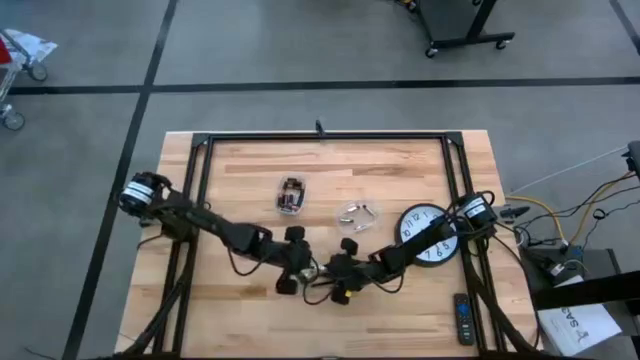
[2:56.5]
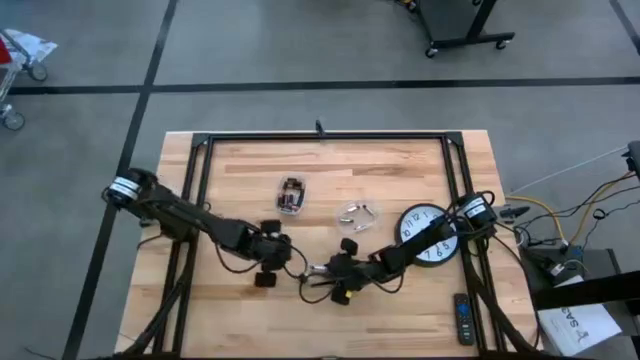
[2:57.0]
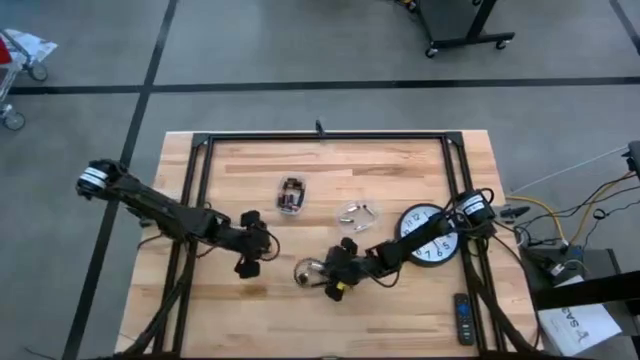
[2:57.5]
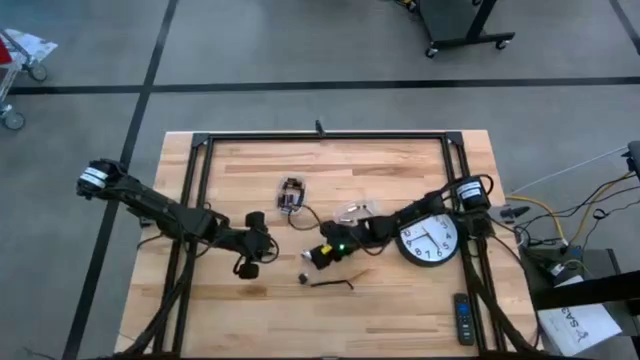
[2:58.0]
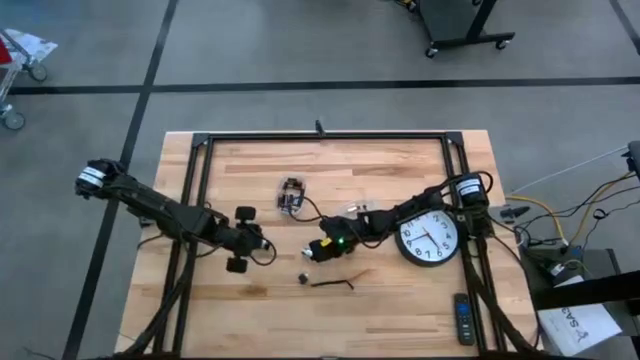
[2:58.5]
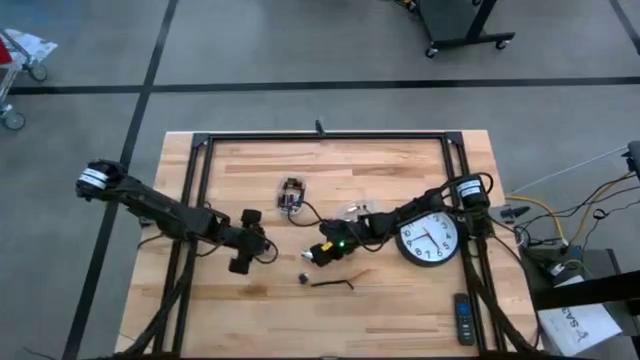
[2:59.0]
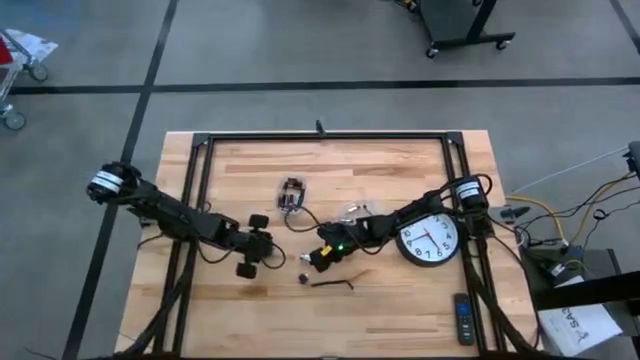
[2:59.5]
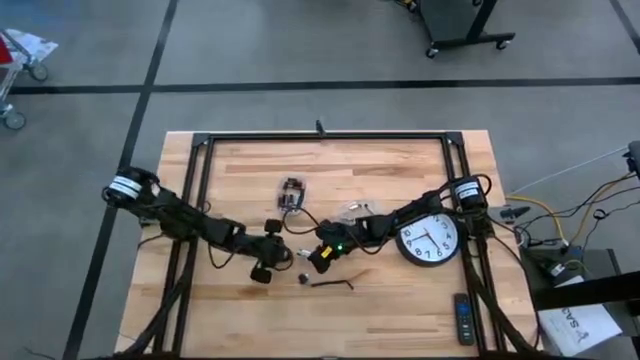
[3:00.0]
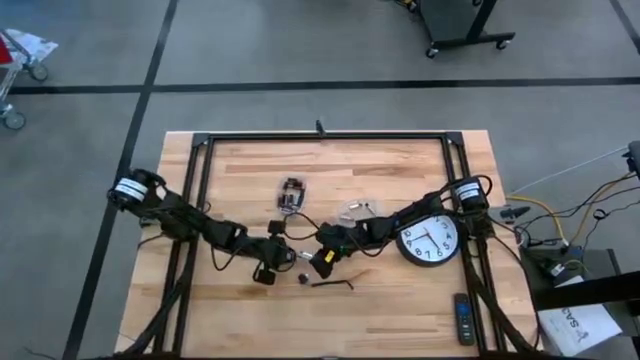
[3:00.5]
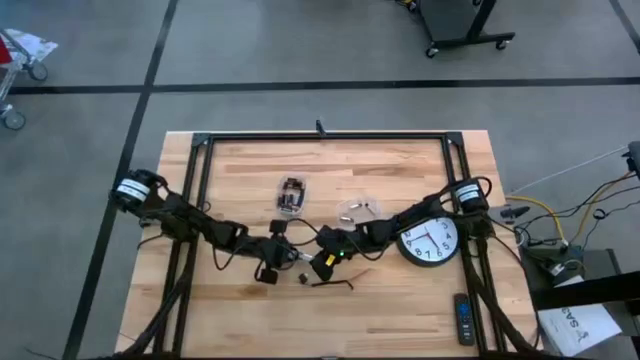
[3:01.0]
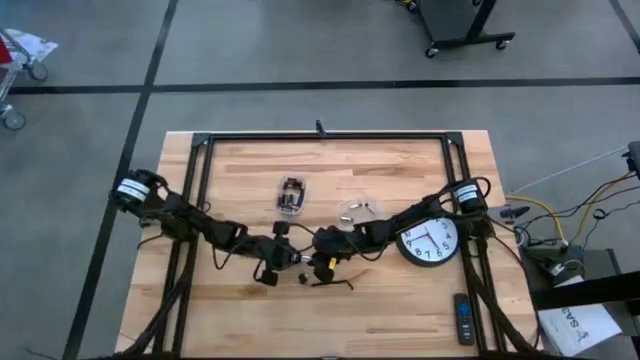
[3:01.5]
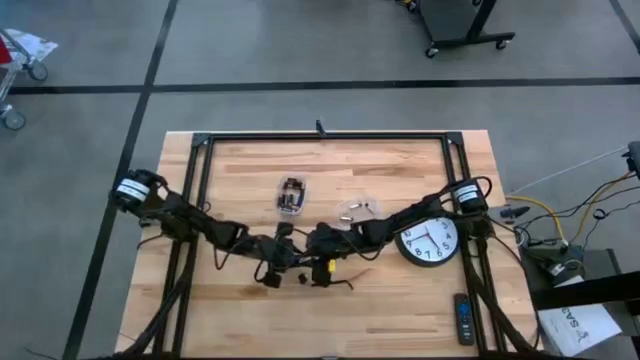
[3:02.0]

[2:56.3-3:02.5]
Task: Insert battery
Put the battery compartment inside the black flashlight

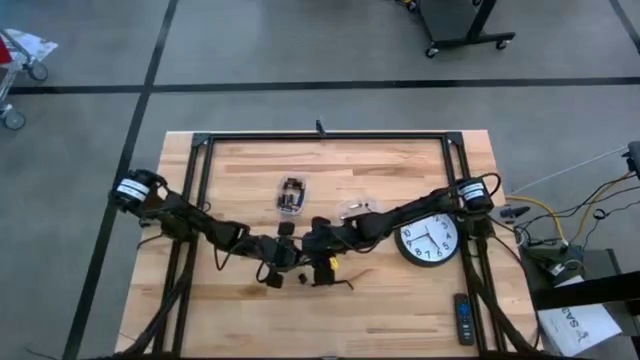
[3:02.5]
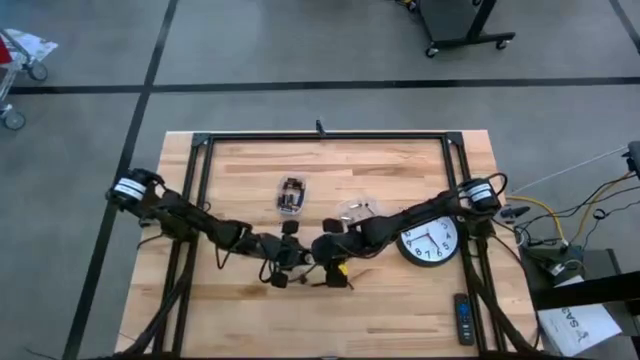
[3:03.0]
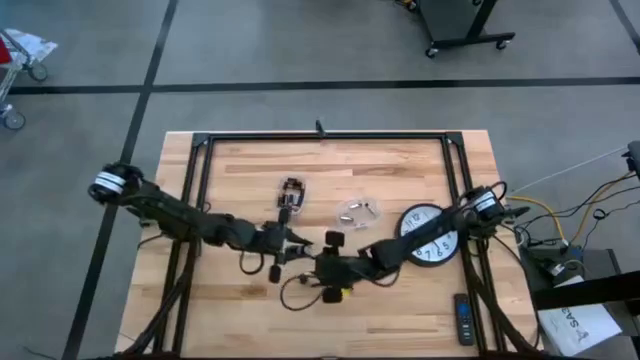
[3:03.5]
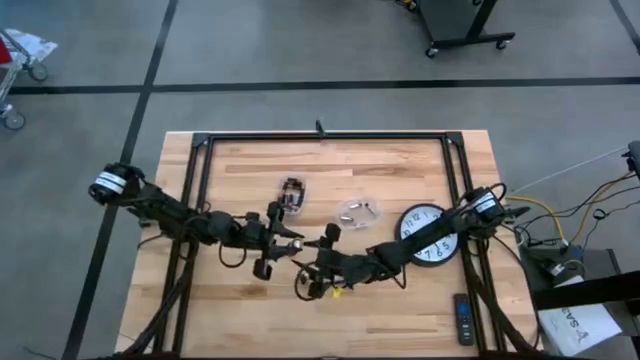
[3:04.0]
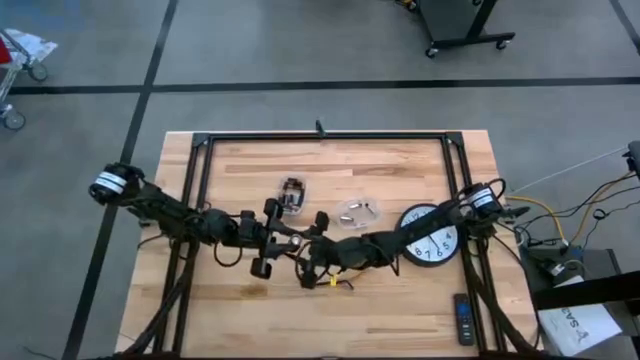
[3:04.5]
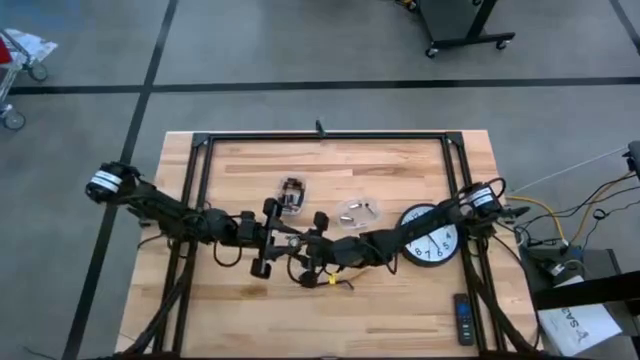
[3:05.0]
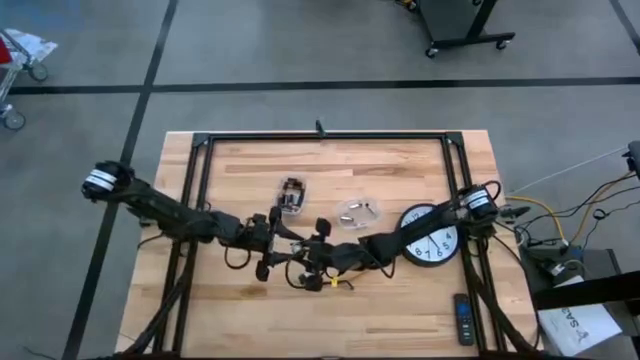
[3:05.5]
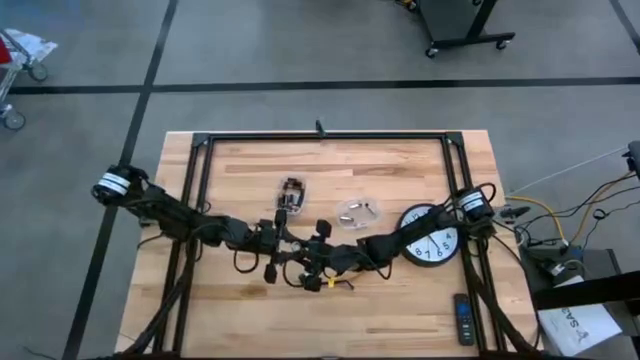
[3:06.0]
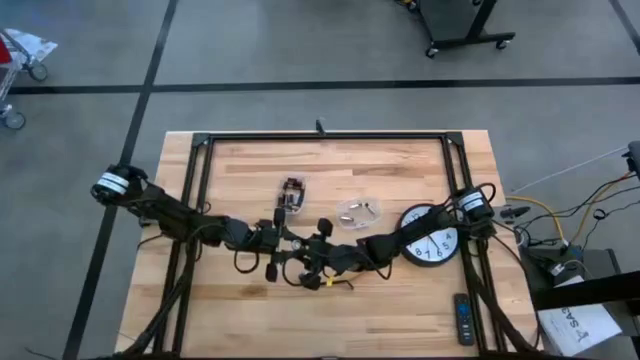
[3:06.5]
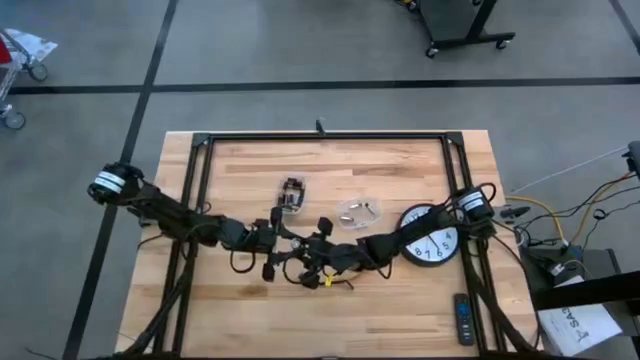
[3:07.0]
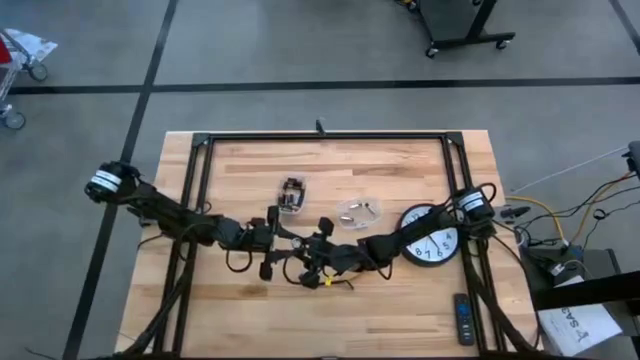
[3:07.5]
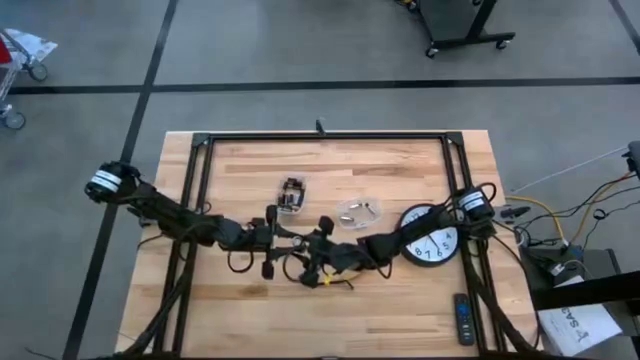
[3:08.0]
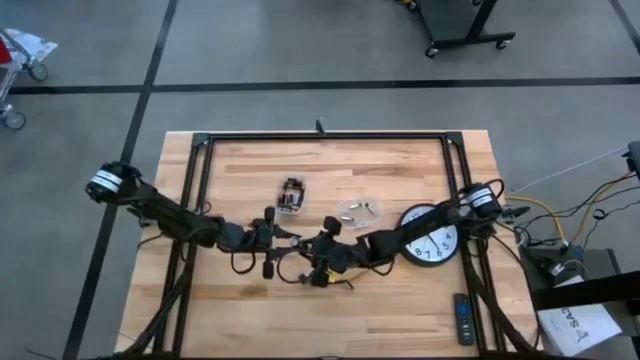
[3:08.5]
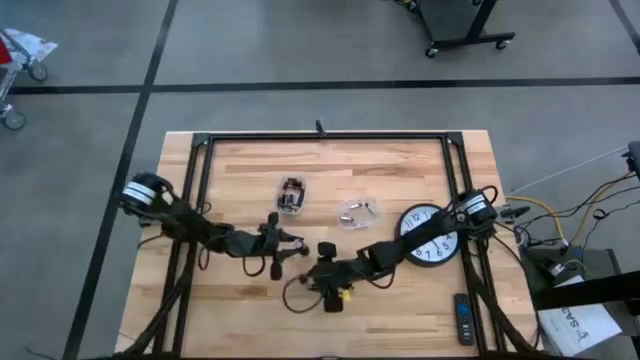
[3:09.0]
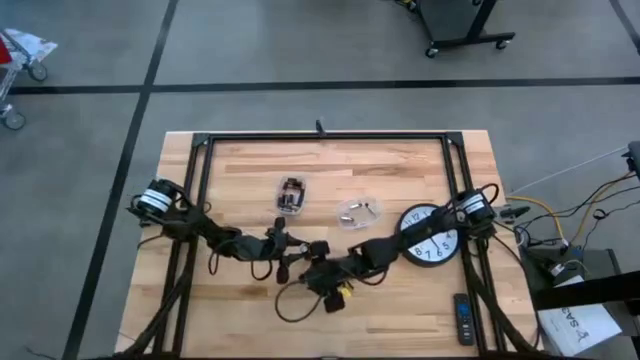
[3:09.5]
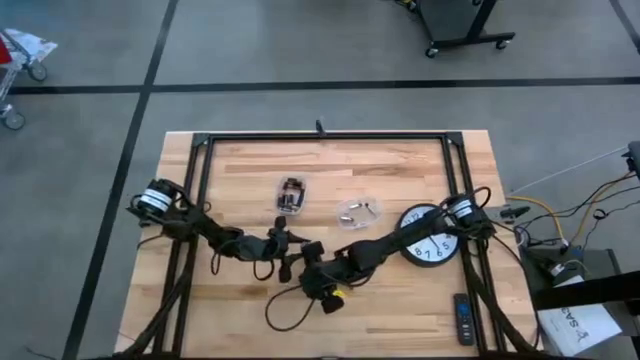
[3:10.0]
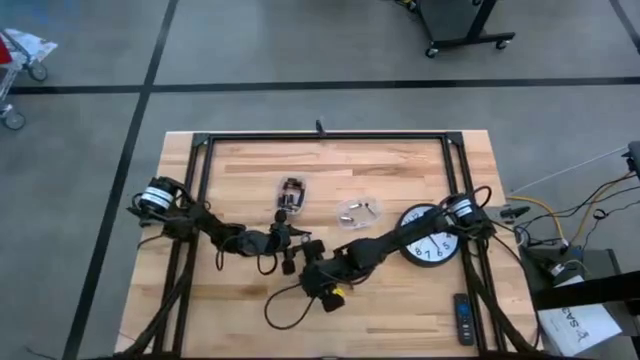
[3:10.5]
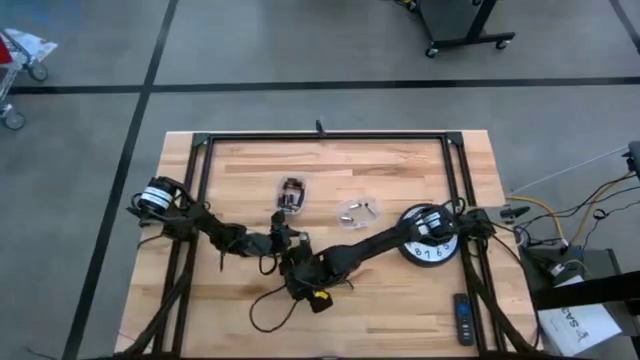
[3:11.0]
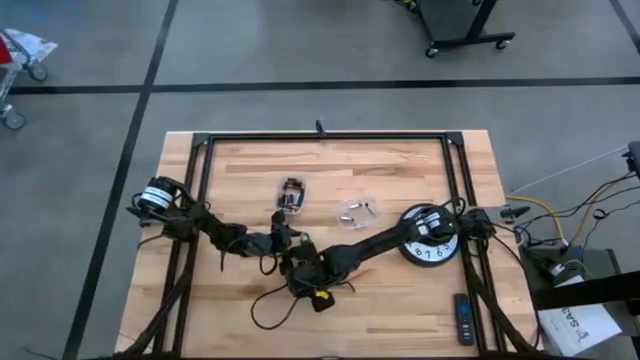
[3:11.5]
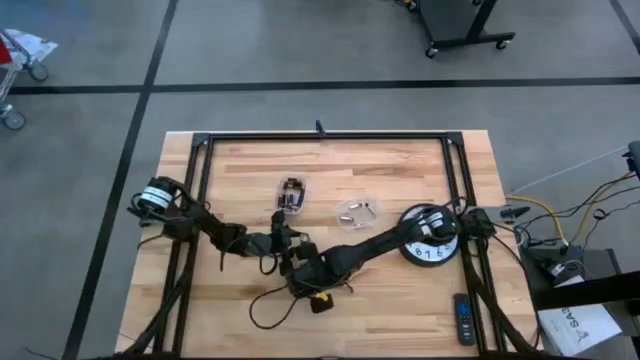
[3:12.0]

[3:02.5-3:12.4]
Close the black flashlight cover

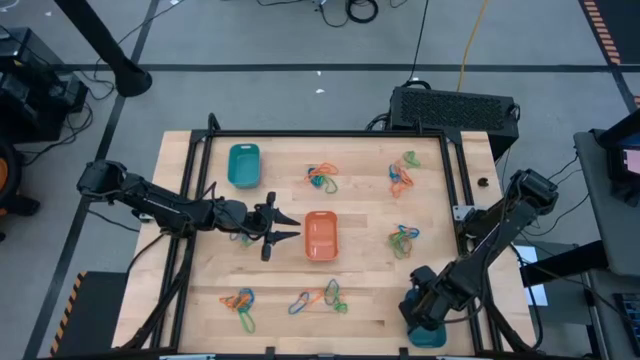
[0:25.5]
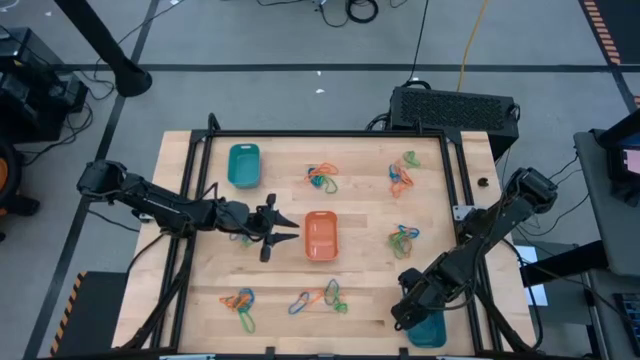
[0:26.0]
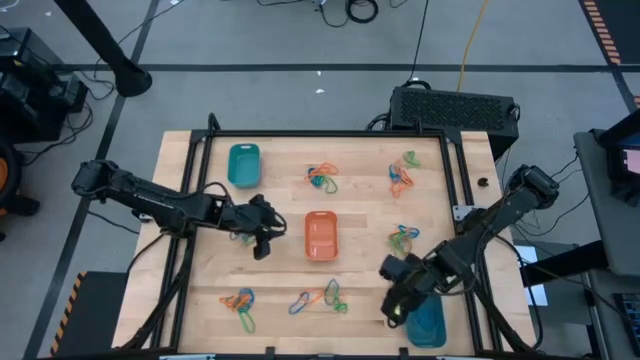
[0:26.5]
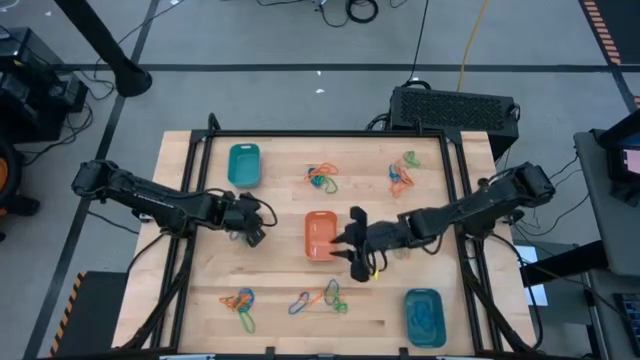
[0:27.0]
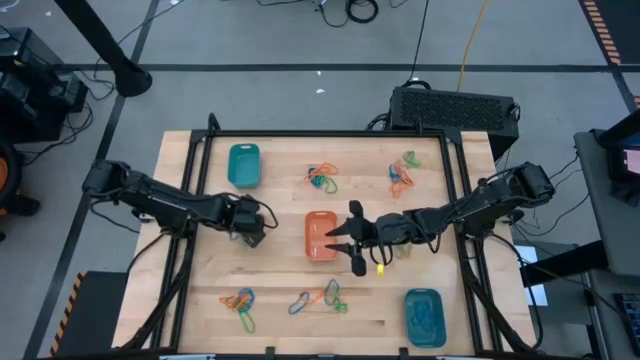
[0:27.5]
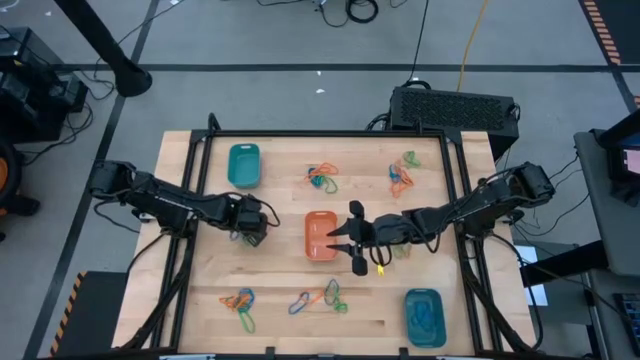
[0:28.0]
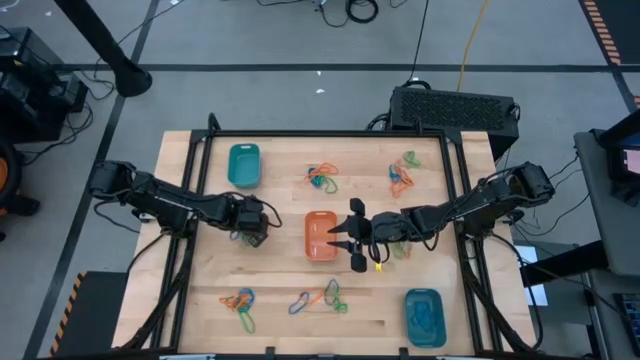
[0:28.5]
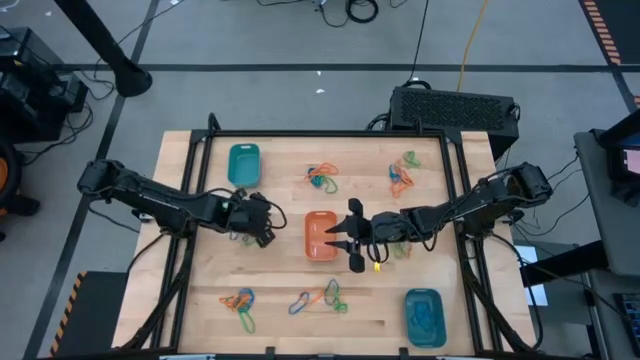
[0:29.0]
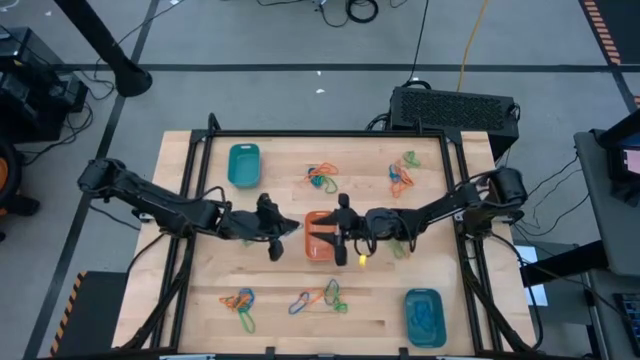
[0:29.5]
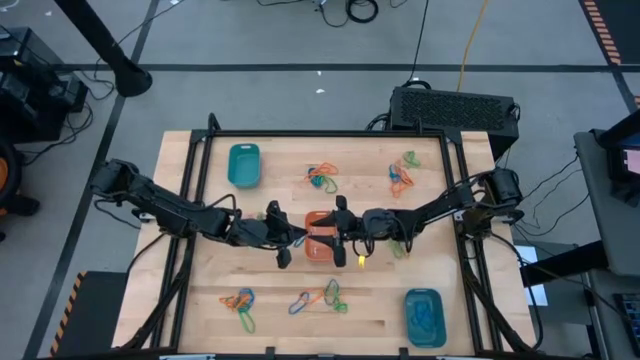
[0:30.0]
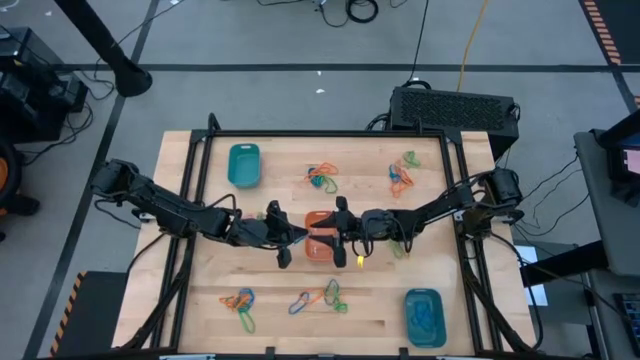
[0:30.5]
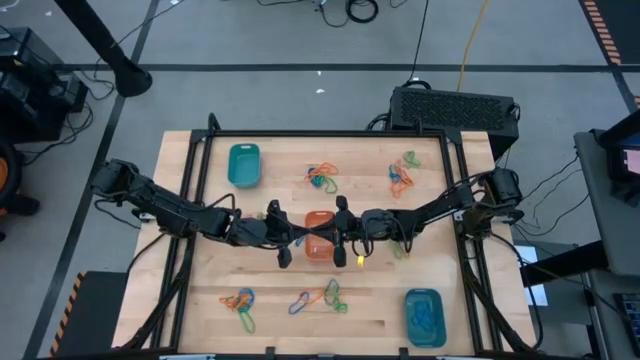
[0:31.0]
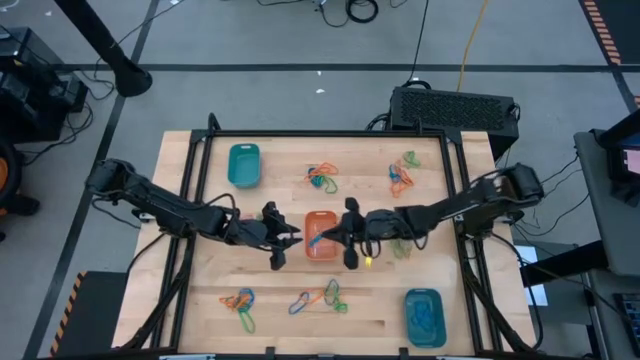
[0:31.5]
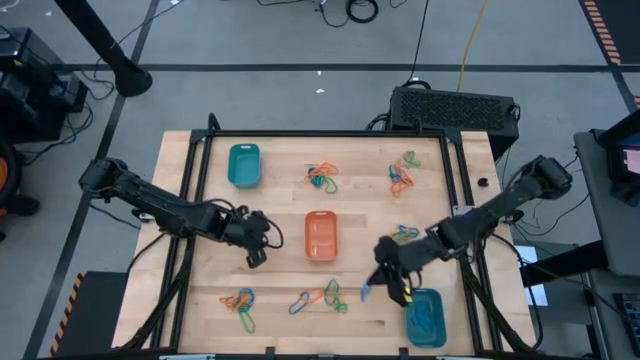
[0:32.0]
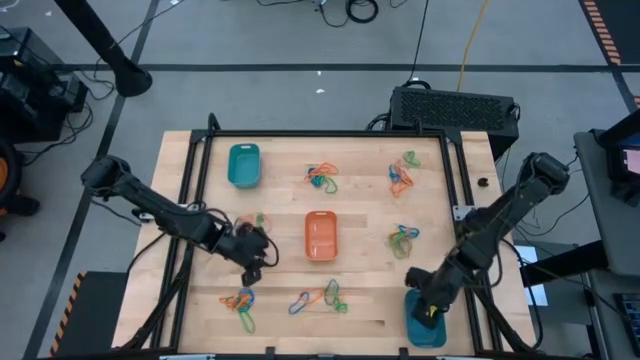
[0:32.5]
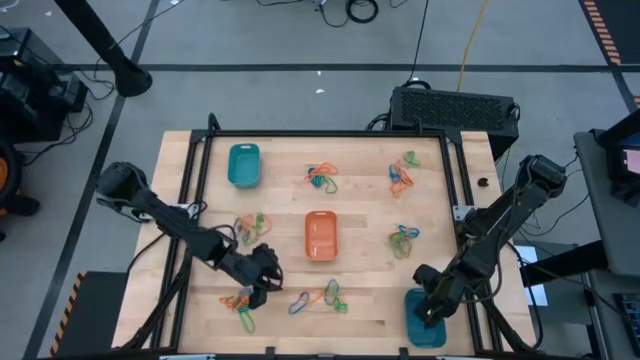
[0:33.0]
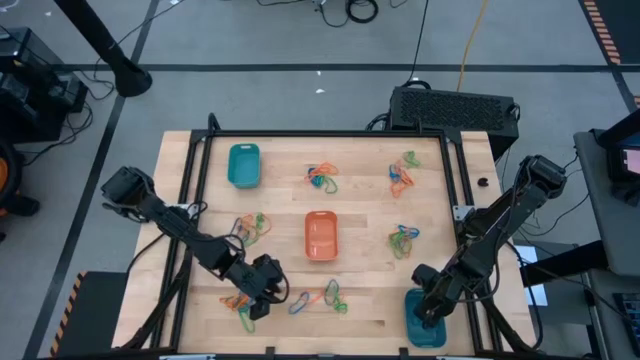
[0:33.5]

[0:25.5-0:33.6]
Task: Sort rubber bands into baskets
Put the blue rubber band into the blue bin
